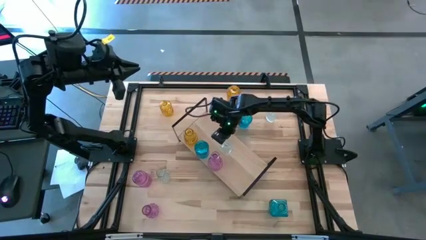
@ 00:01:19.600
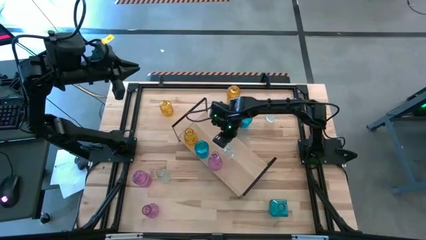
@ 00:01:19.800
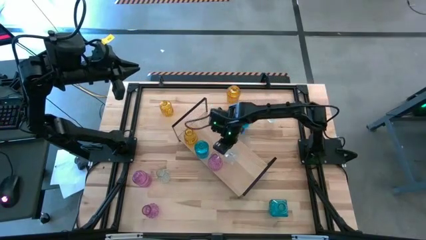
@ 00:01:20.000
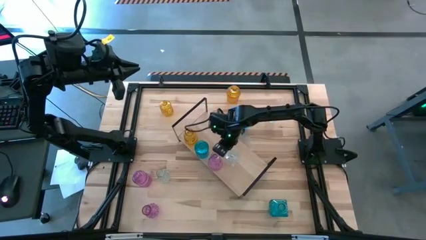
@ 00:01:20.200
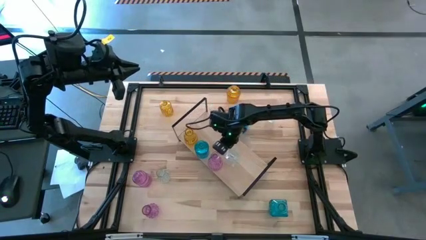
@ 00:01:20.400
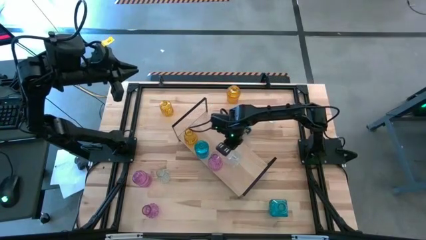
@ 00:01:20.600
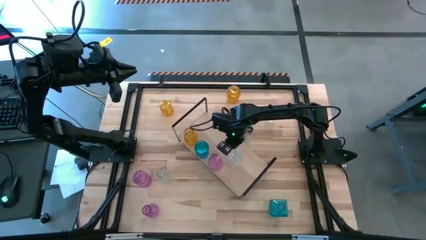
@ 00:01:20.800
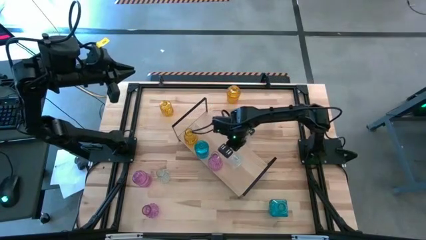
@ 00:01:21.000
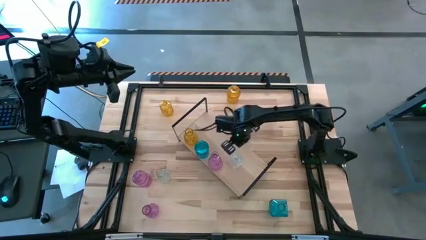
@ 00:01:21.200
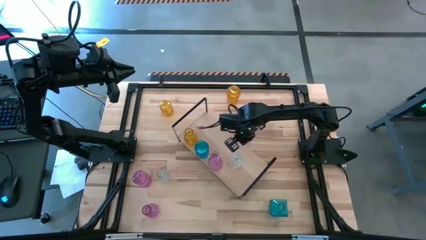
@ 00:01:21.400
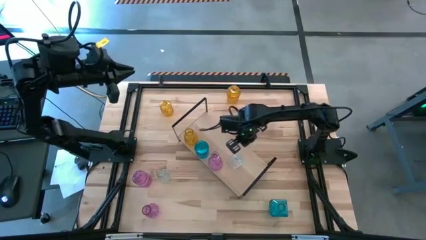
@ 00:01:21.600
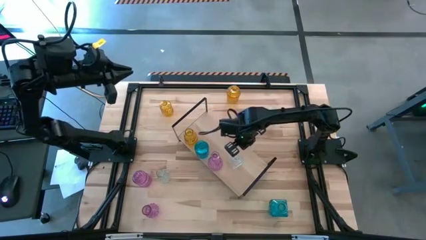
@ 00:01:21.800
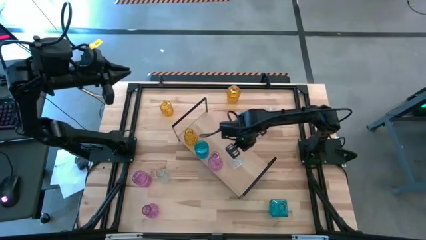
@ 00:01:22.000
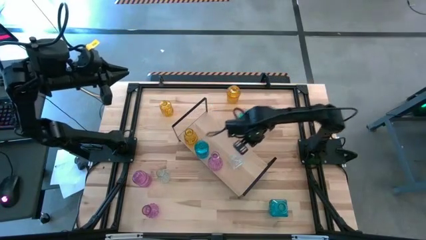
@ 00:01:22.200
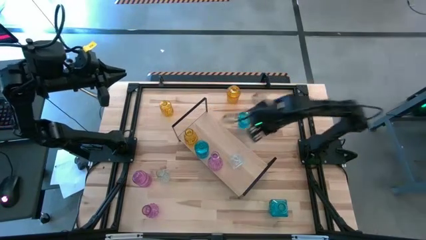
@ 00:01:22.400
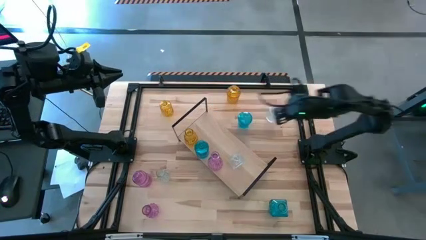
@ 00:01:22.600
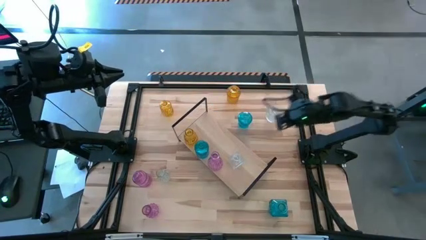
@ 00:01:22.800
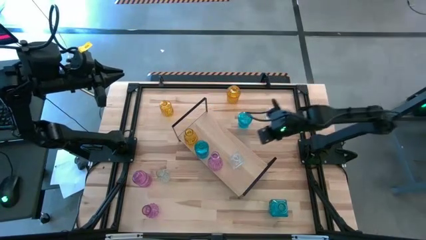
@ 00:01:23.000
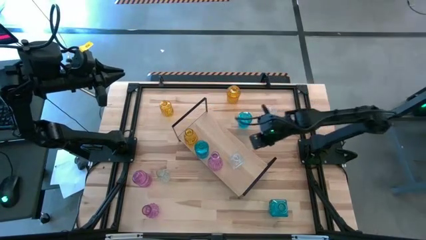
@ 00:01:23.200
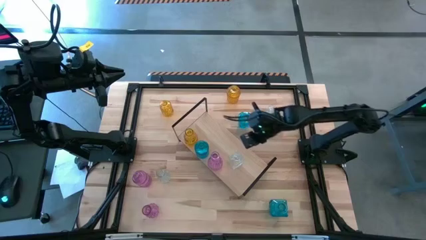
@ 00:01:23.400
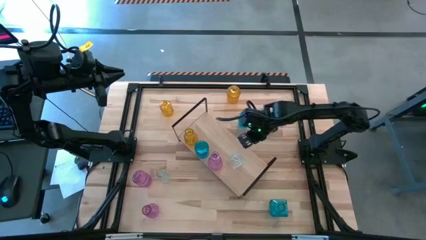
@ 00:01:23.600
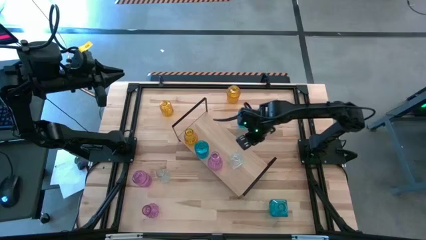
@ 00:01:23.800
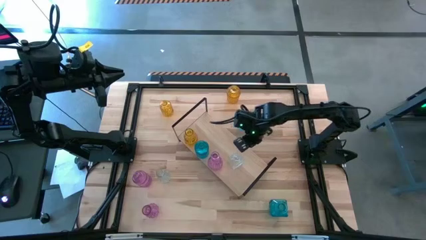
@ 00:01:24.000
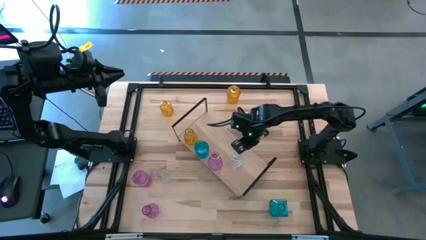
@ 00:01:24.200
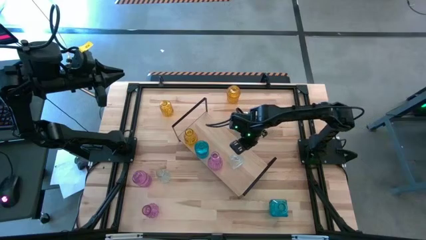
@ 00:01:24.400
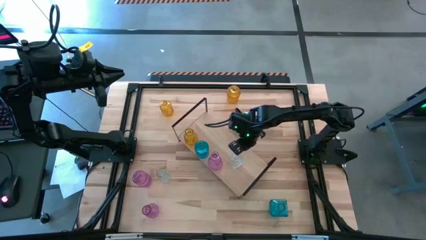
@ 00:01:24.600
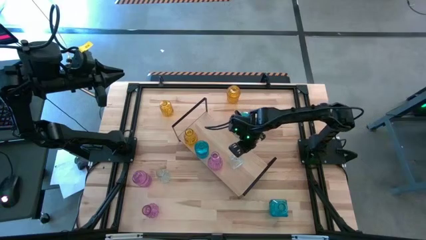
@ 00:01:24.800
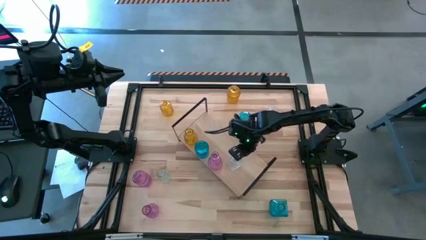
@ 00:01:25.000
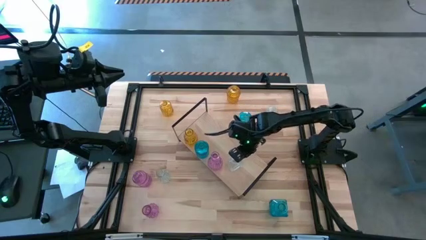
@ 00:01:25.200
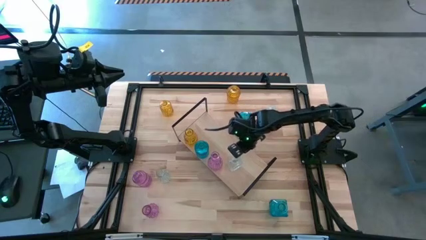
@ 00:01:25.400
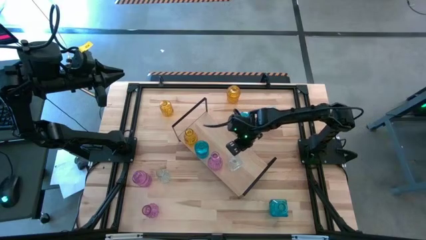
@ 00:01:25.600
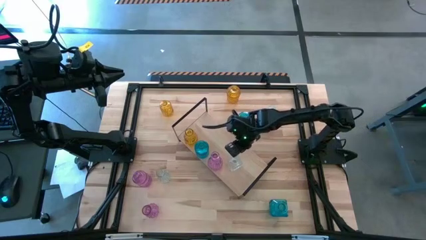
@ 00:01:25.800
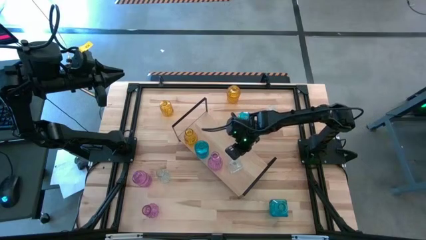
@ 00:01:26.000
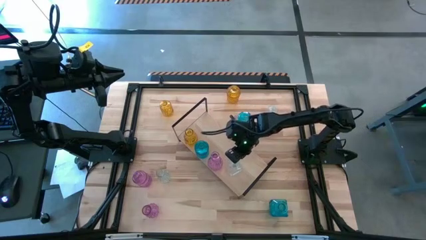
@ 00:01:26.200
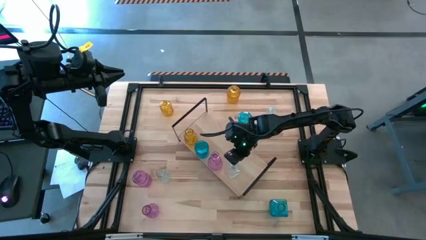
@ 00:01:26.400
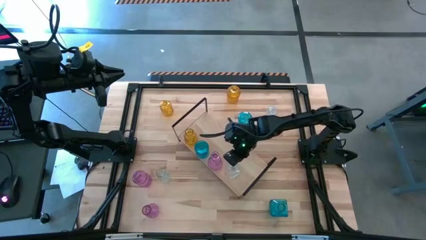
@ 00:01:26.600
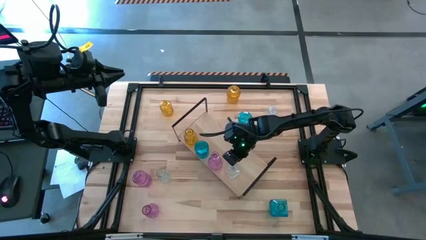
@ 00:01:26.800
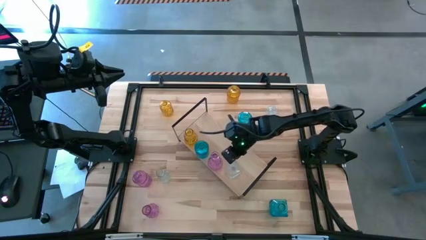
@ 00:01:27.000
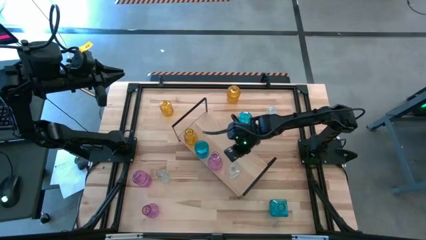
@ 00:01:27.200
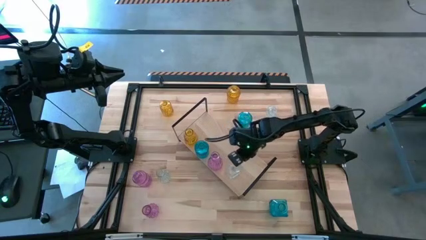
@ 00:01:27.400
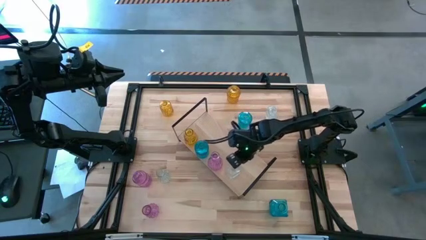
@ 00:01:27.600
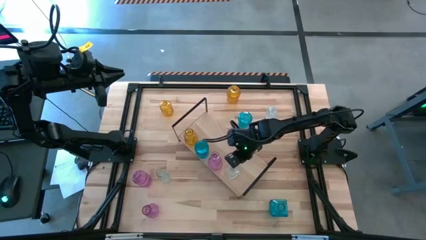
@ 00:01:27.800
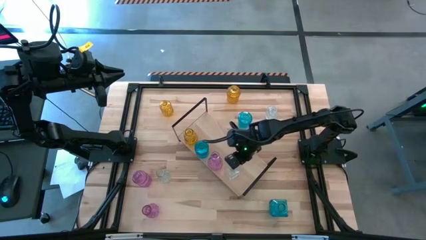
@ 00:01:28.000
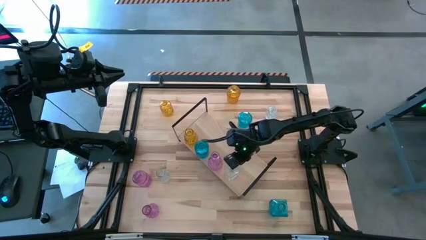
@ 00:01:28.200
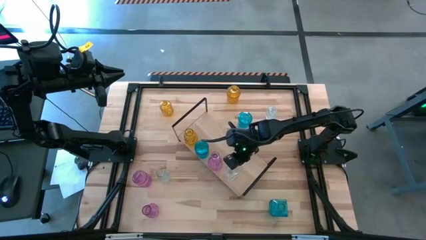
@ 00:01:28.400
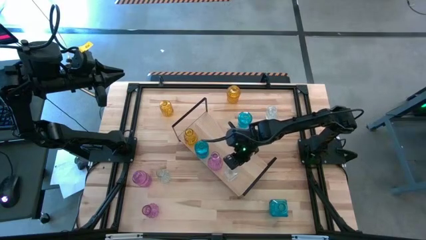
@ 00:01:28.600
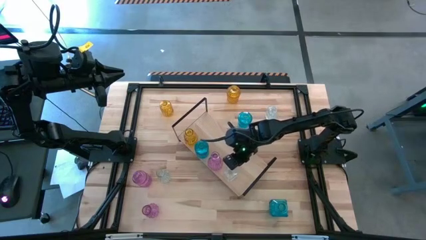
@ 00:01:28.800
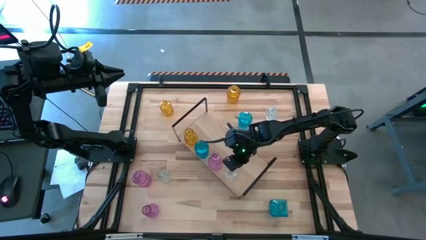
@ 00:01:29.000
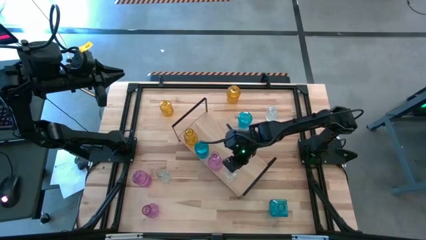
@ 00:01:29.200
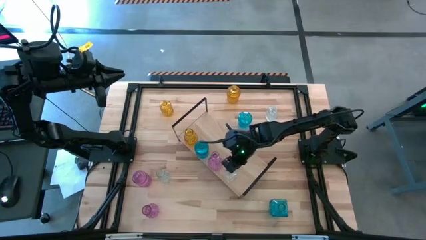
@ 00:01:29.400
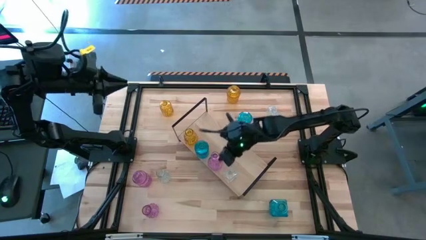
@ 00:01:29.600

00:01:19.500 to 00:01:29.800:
Task: sort vases onto shelf
Put the top left crystal vase on the shelf
